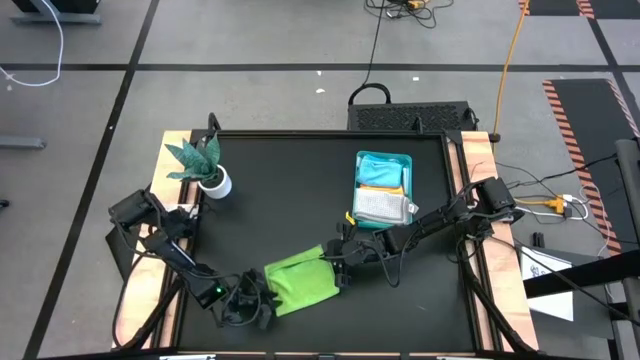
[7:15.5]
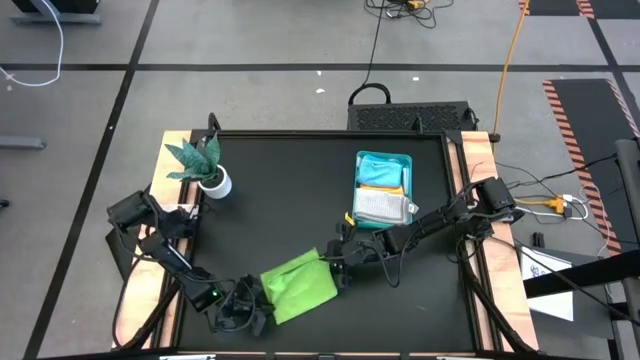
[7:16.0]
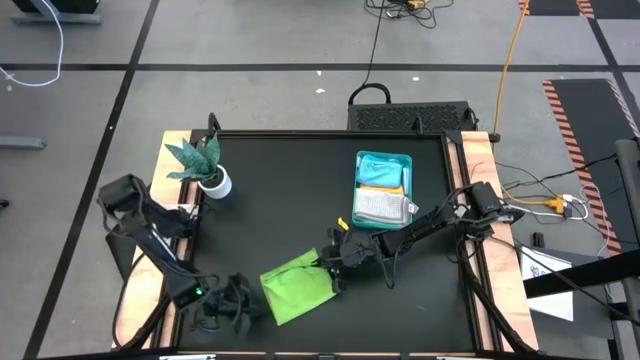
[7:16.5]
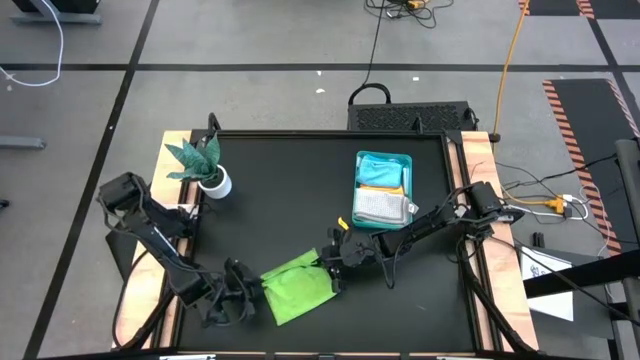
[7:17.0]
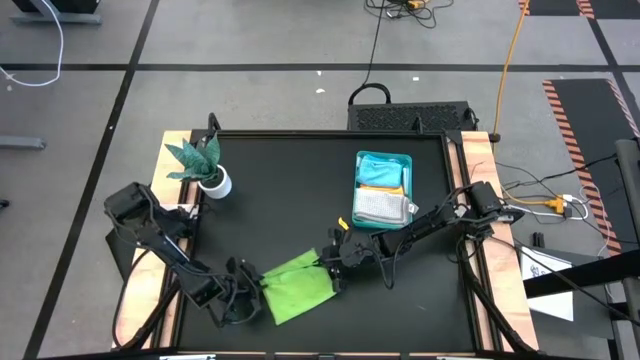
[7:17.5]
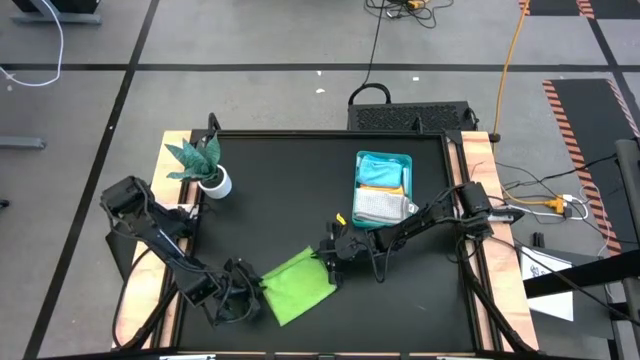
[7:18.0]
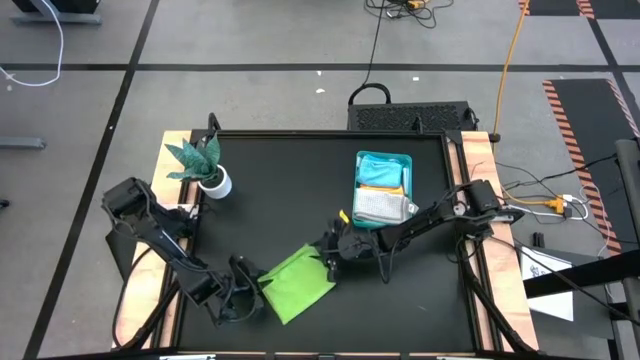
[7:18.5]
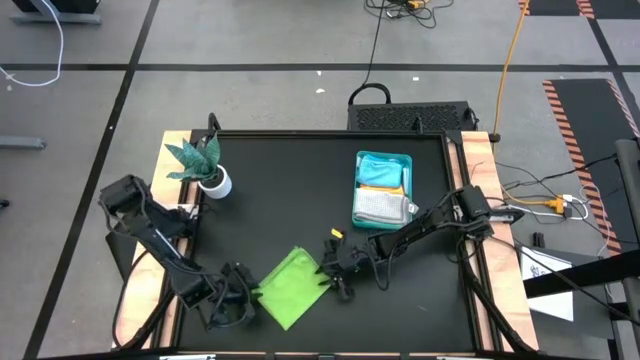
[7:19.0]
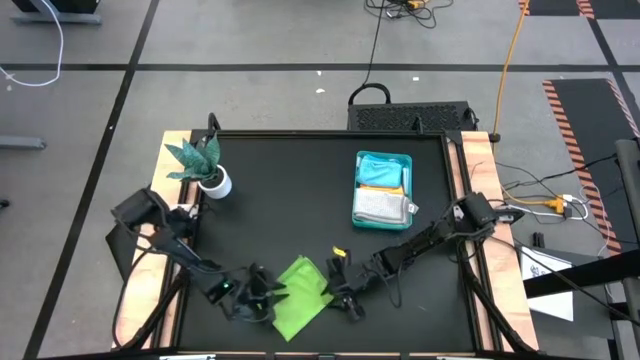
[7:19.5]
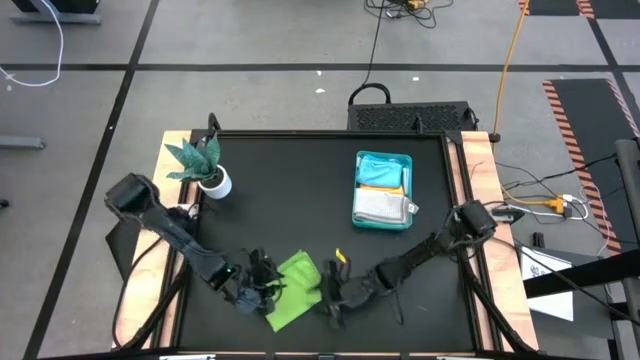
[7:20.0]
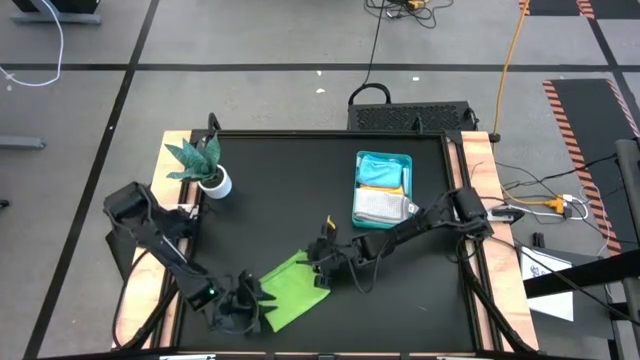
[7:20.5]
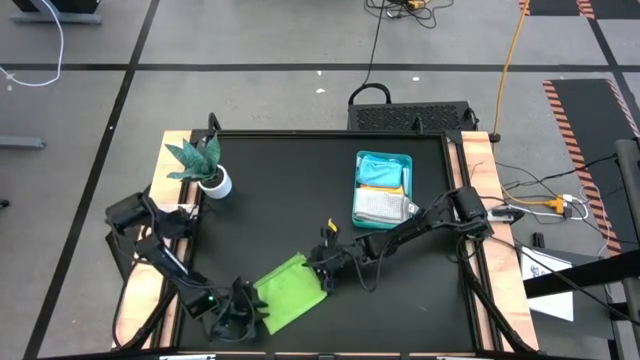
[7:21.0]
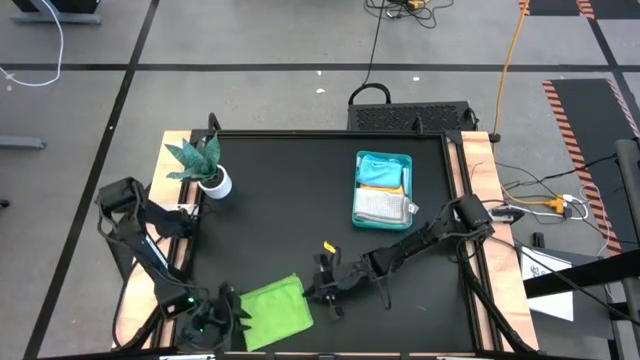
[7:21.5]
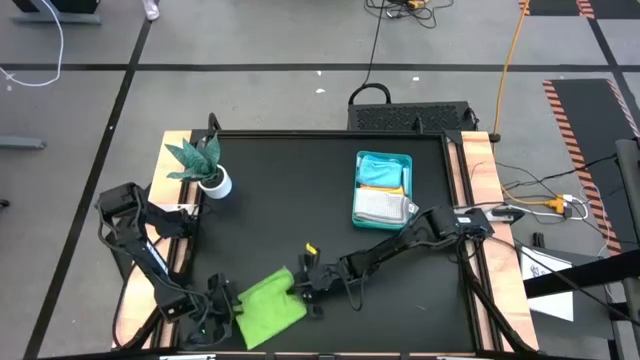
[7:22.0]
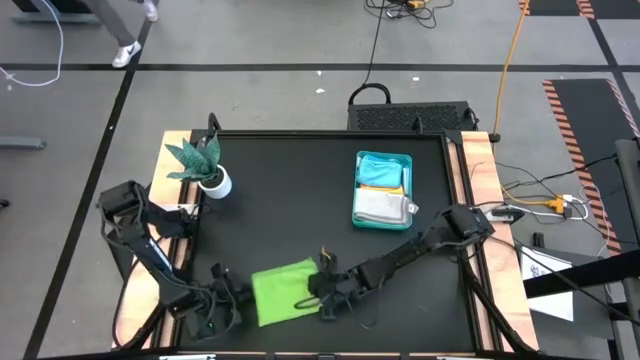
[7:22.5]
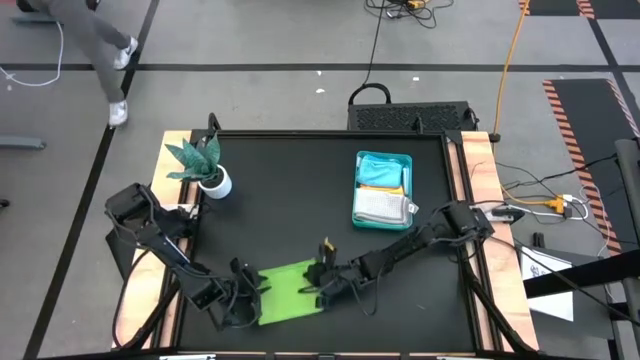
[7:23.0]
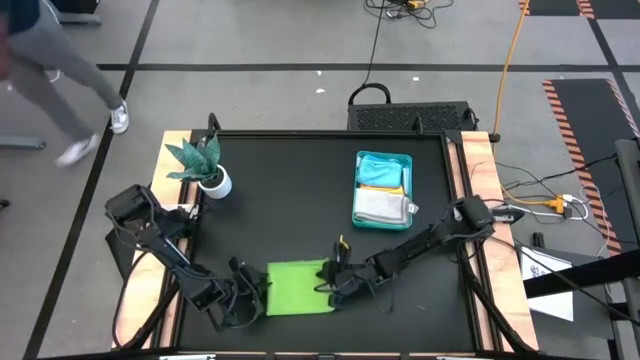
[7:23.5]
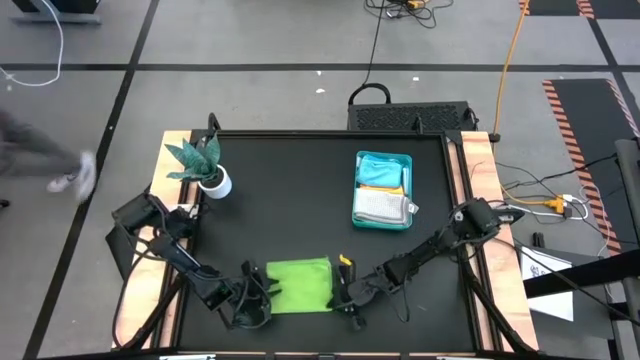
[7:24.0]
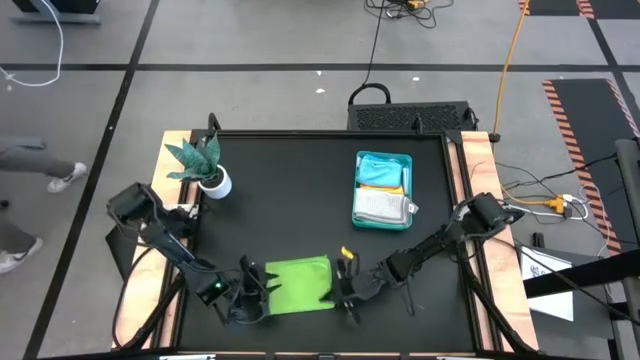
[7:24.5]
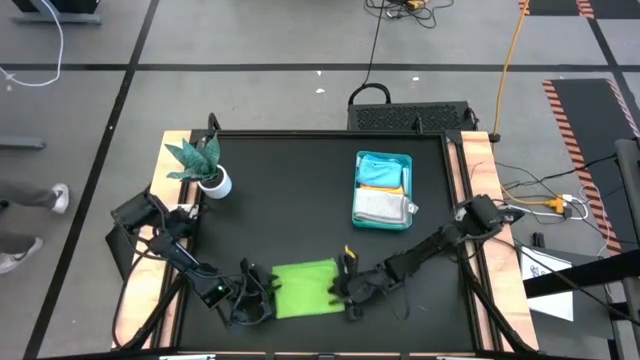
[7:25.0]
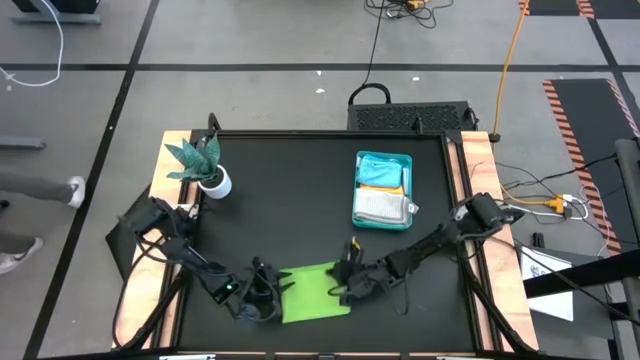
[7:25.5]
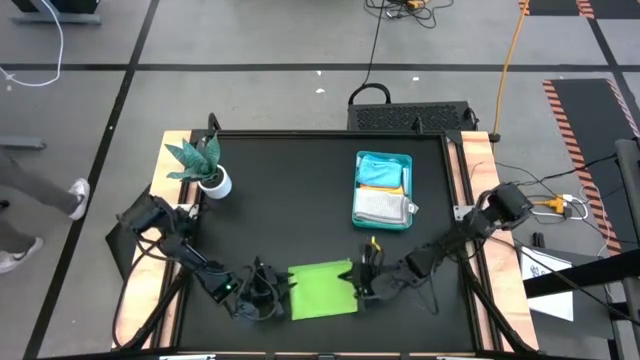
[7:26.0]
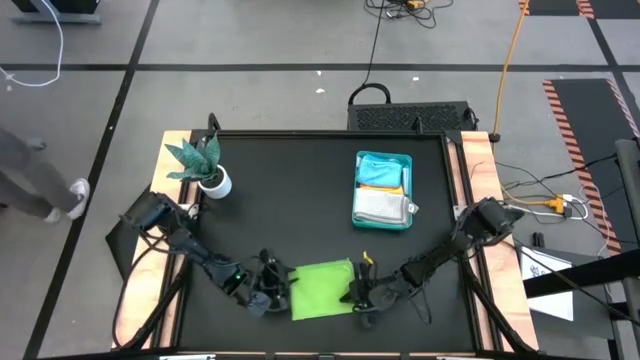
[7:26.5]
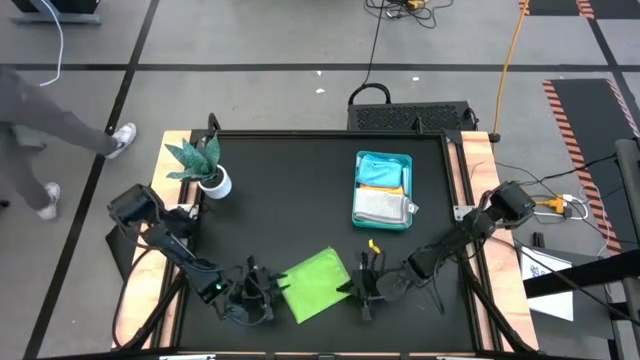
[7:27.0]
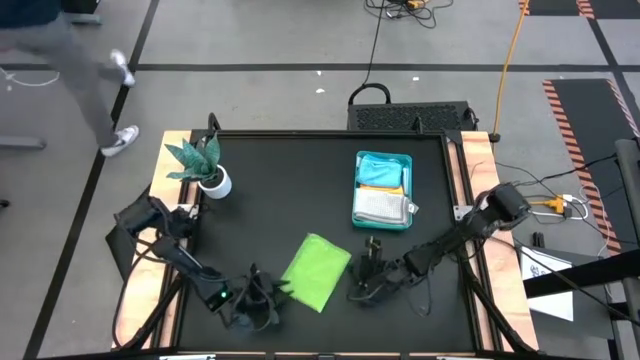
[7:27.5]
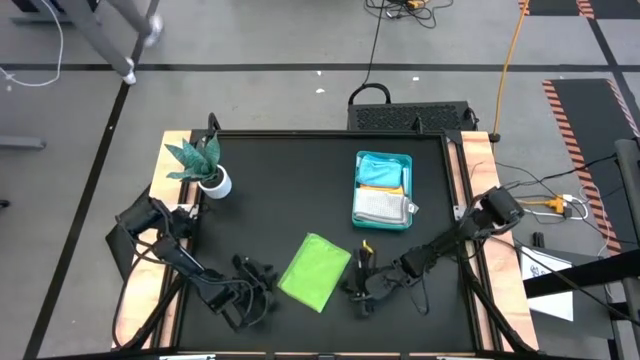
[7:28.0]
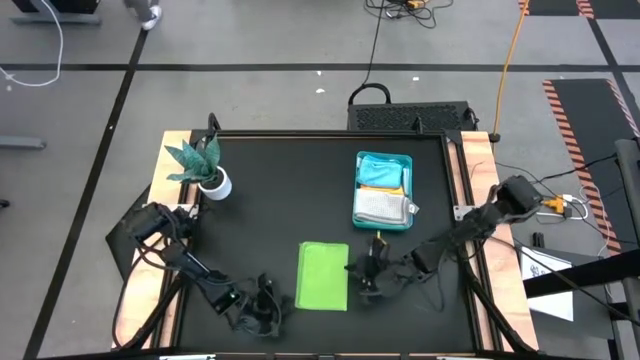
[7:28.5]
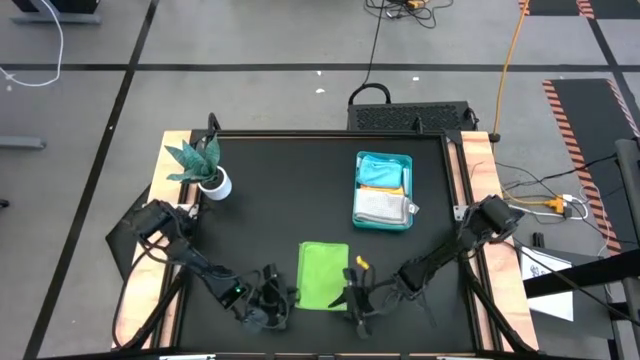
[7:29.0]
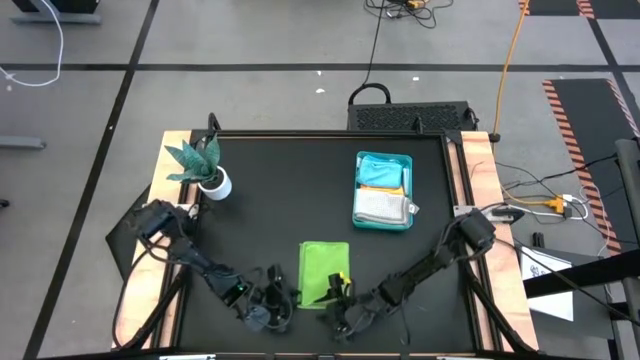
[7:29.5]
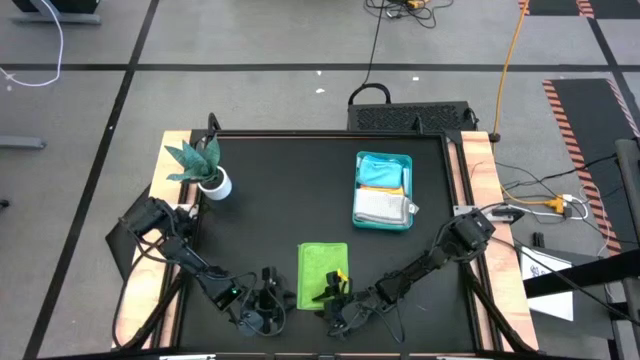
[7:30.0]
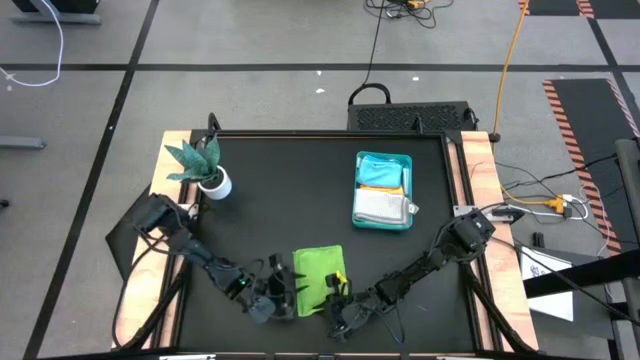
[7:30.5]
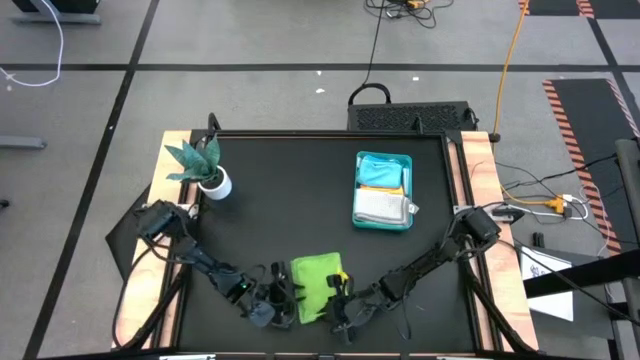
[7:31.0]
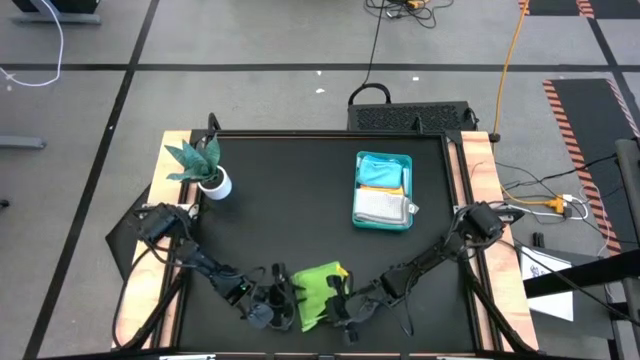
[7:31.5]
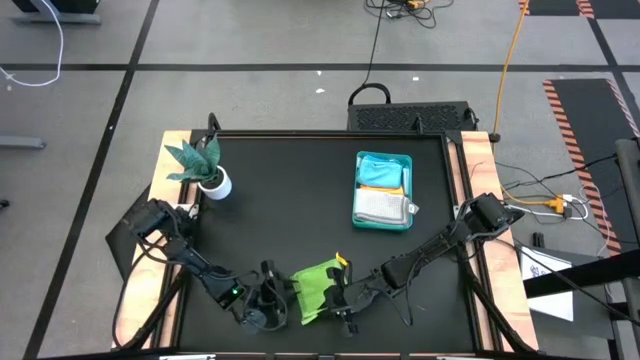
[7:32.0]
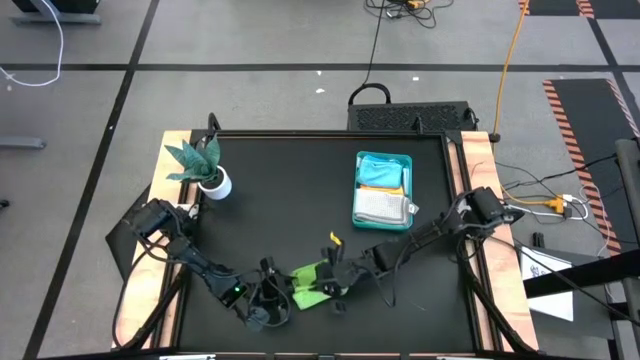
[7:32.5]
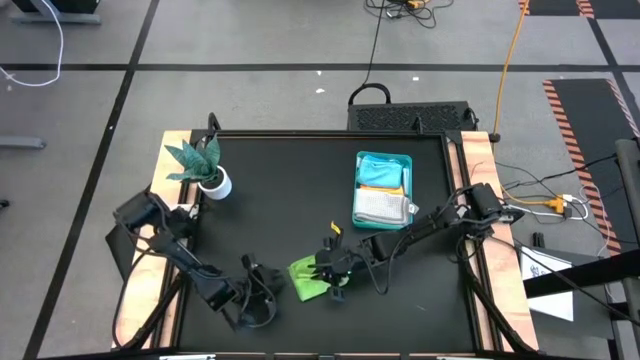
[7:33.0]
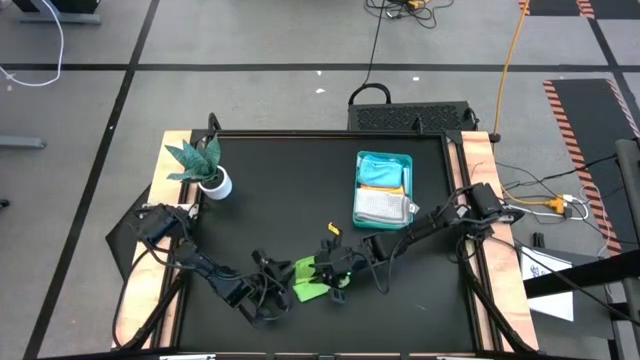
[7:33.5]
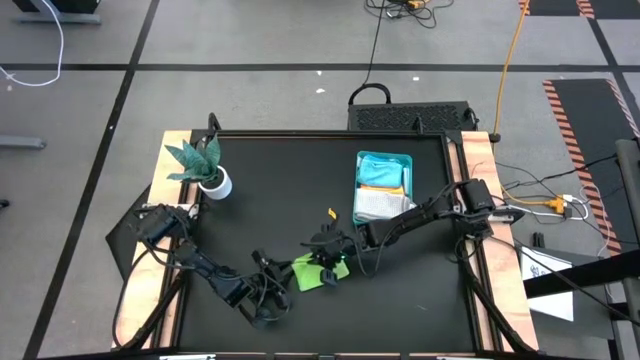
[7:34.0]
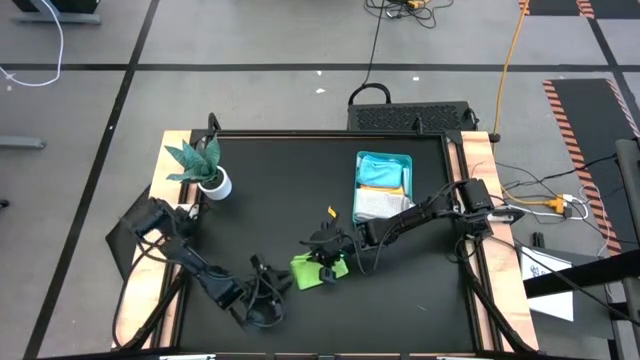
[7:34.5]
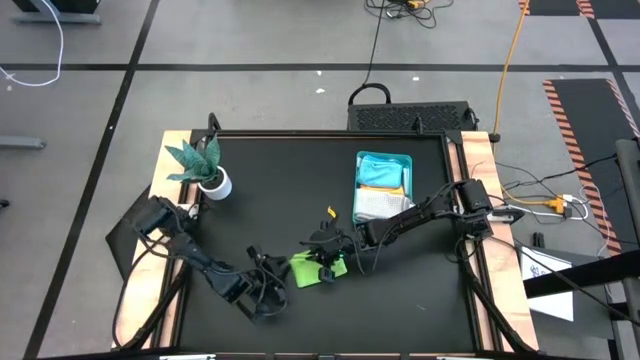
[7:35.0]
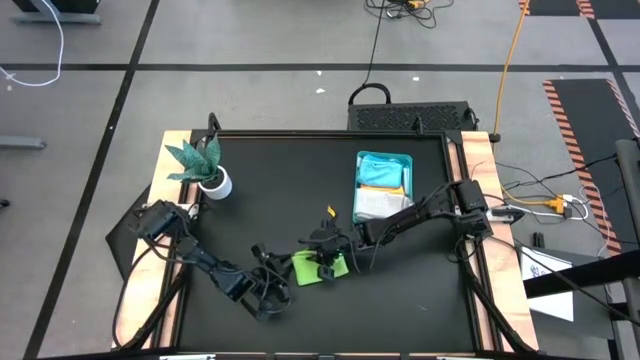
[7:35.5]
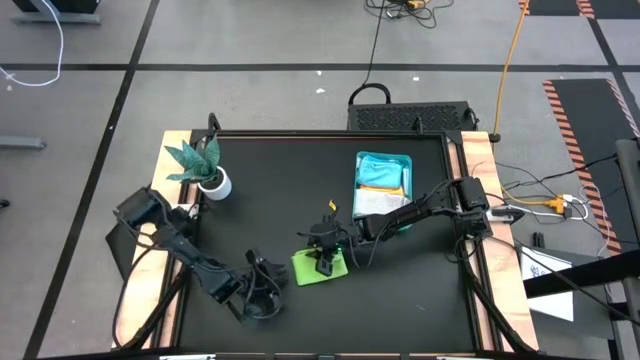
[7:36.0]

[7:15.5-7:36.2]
Task: Fold microfiber towels
Fold the light green microfiber cloth
